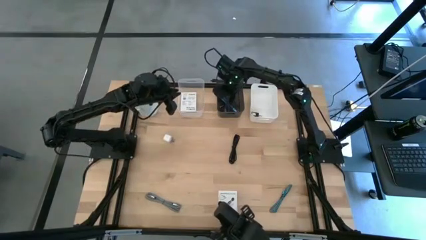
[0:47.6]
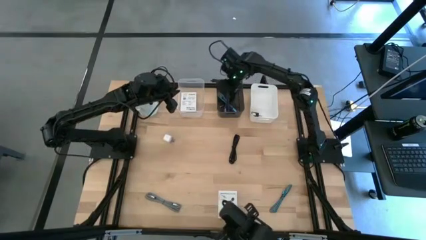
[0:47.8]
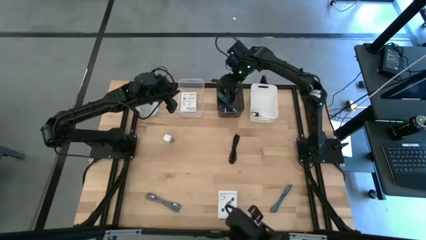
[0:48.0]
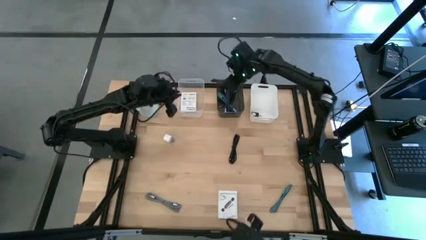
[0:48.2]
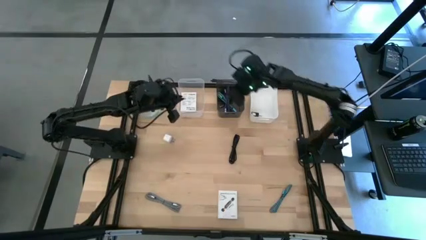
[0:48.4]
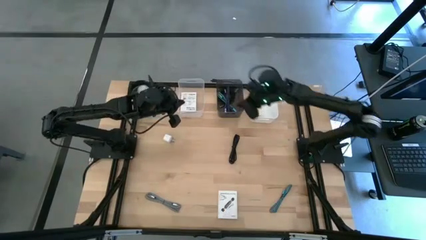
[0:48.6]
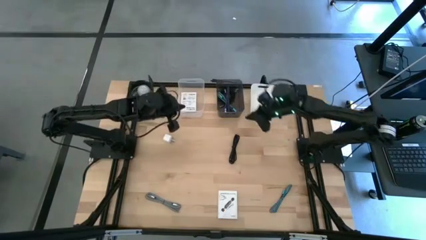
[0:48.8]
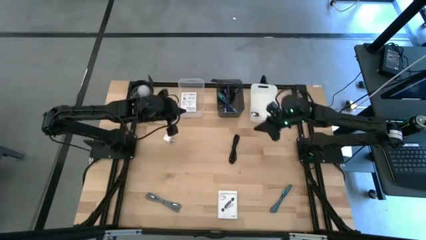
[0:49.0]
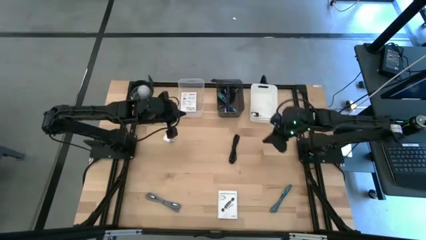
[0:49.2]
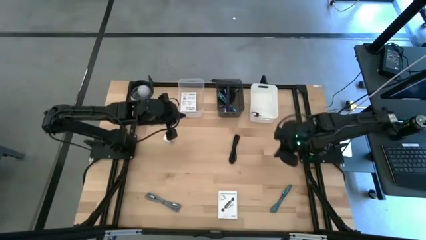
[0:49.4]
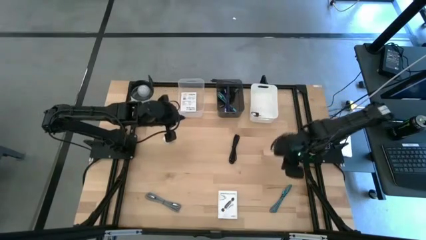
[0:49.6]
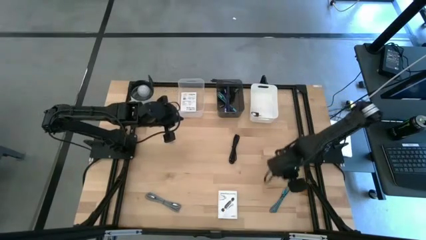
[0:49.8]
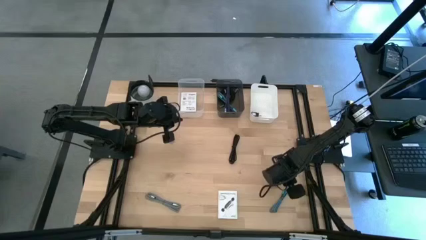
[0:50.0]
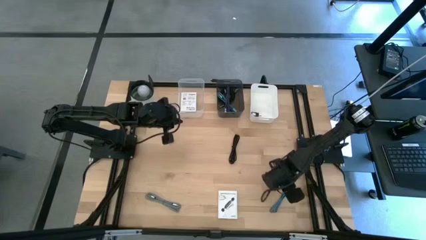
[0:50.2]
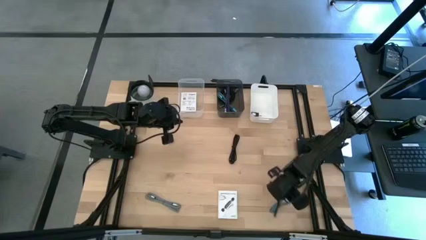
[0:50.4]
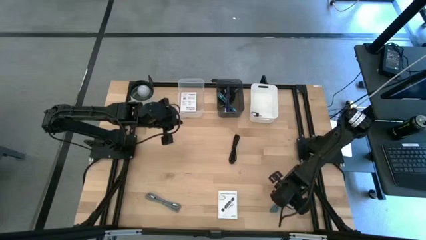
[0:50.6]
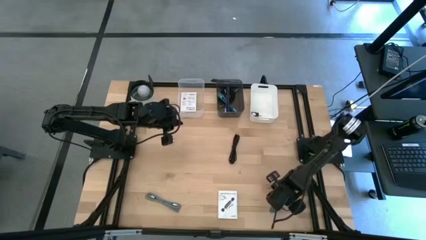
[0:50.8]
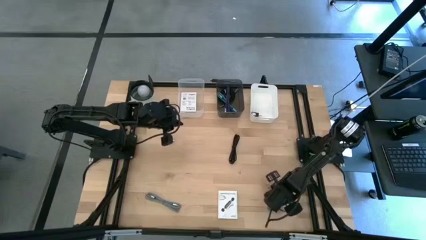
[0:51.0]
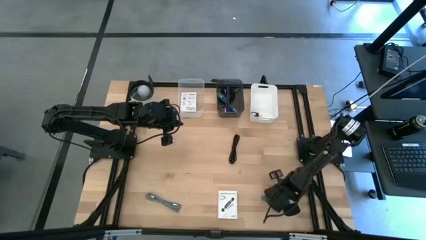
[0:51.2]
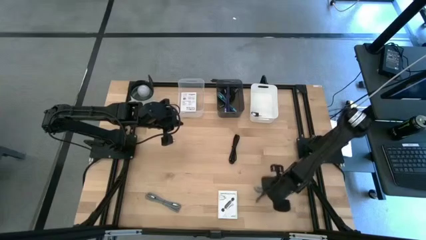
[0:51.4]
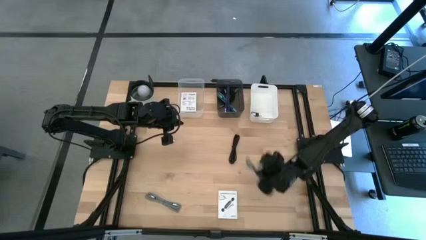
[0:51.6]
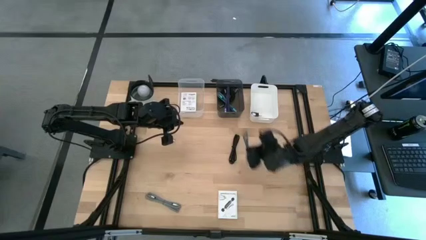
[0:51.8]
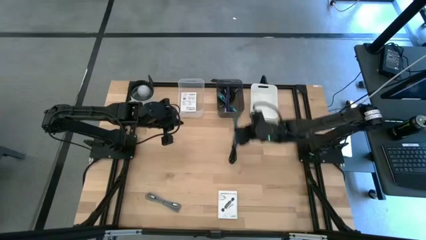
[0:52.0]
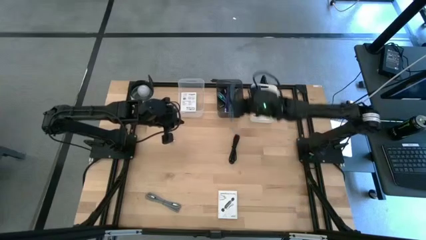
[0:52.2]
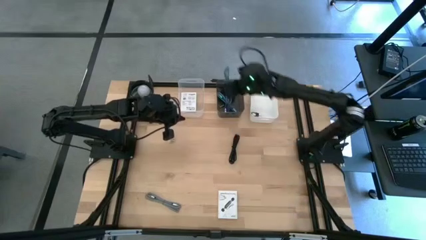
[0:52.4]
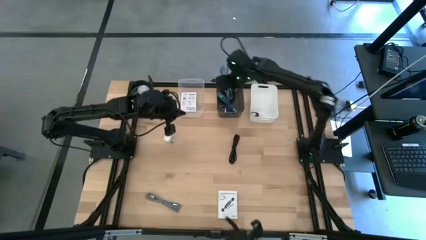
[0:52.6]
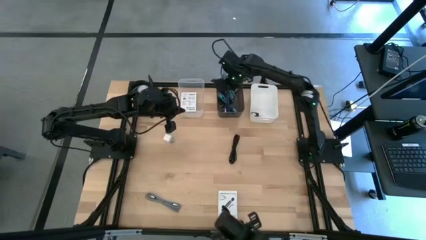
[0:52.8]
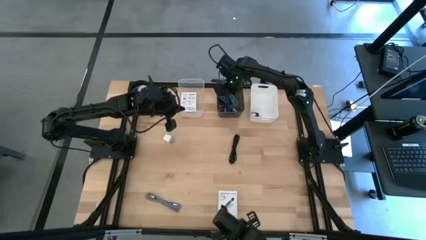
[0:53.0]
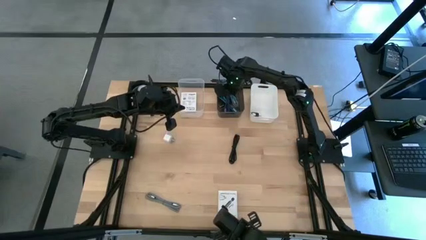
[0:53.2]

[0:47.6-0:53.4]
Task: Pick and place items into bin
Put the blue charger cable into the black bin

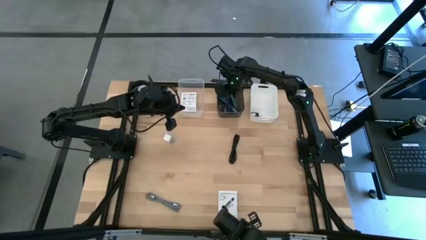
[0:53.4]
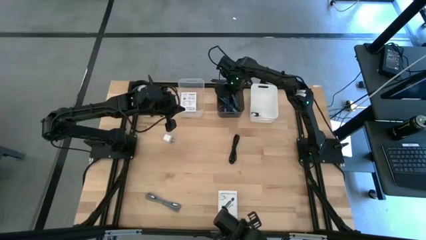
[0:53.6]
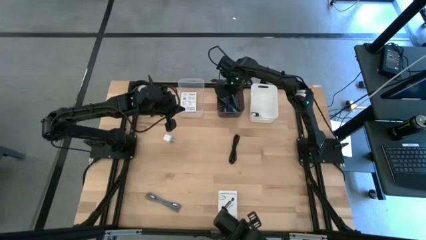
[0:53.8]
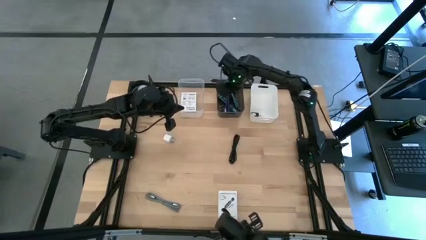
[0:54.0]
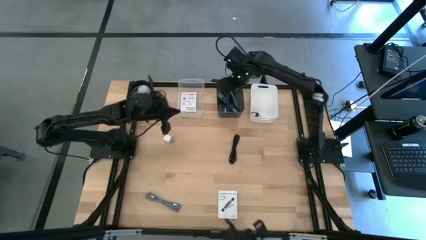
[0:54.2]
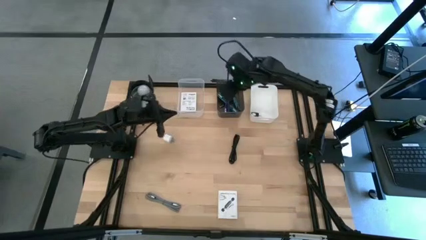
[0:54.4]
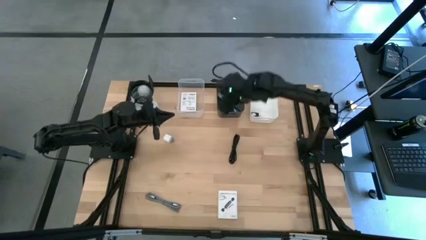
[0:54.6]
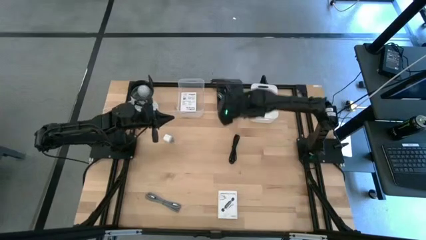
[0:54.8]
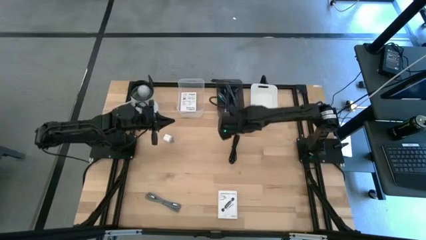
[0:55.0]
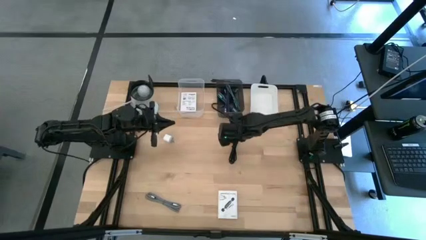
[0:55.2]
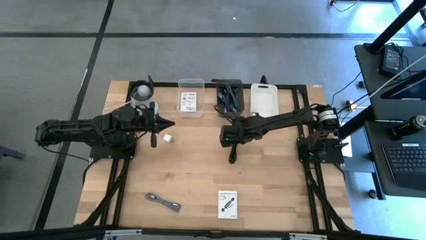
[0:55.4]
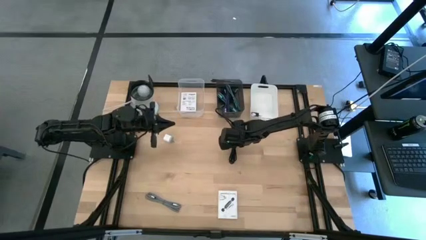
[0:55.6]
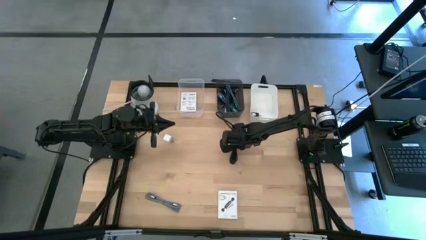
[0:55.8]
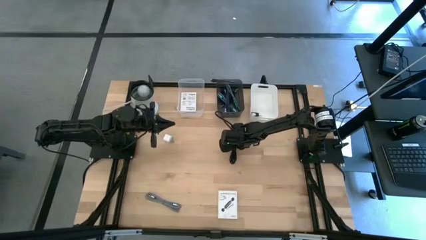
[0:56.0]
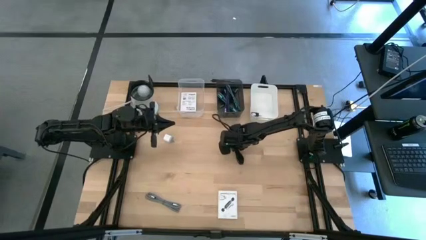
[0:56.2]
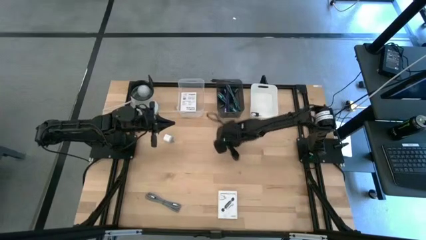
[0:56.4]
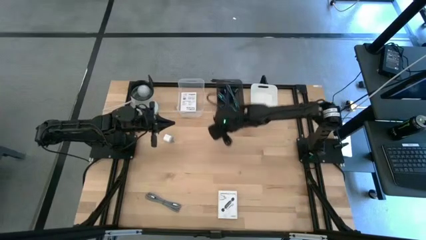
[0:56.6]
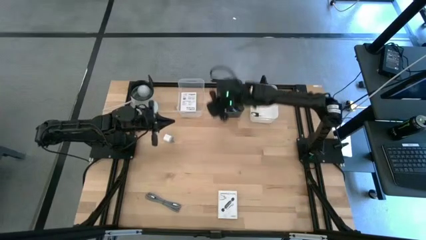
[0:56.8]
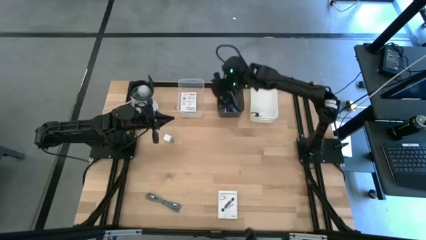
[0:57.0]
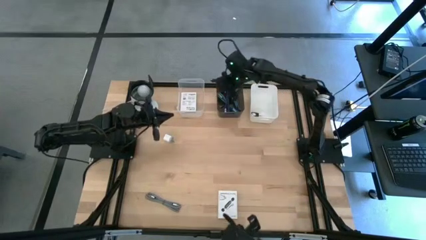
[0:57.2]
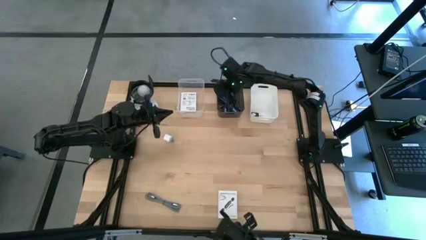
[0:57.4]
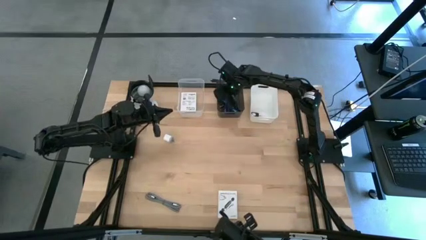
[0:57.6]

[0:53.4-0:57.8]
Put the black charger cable into the black bin

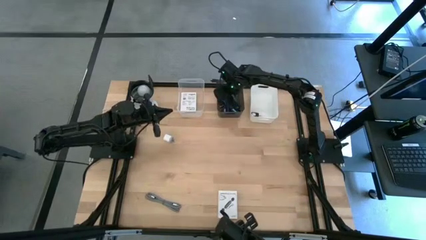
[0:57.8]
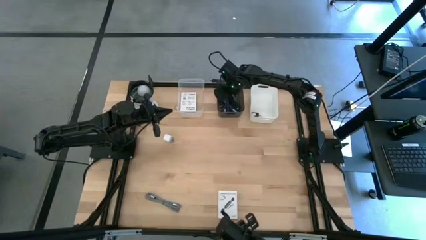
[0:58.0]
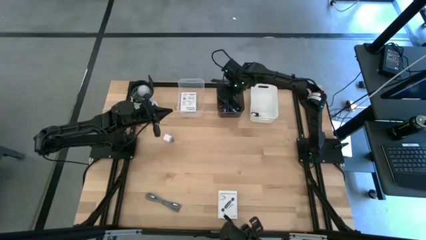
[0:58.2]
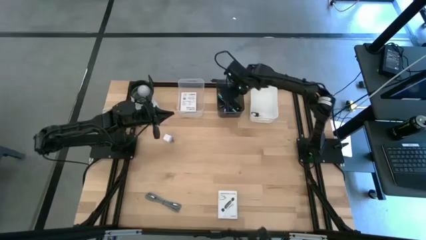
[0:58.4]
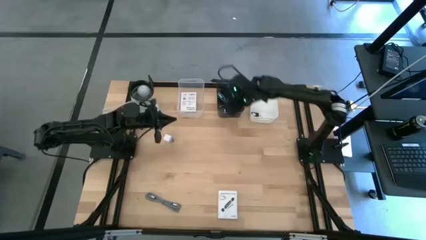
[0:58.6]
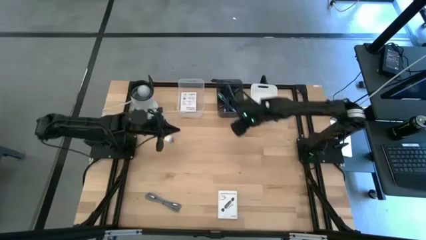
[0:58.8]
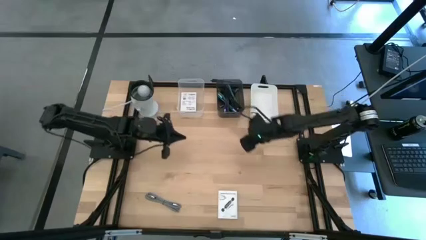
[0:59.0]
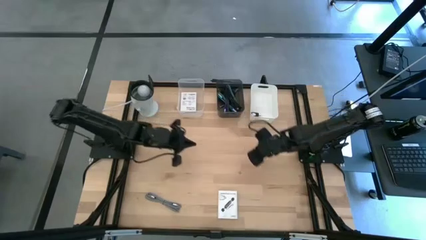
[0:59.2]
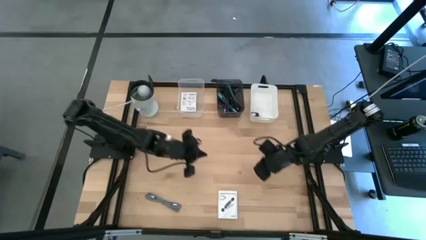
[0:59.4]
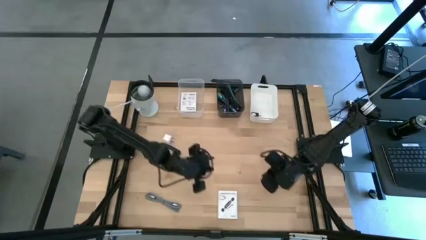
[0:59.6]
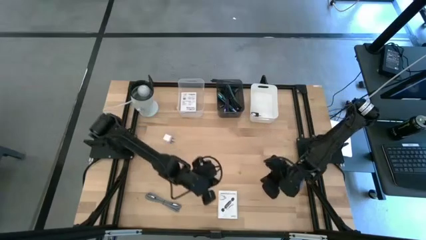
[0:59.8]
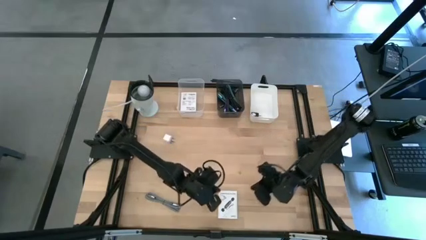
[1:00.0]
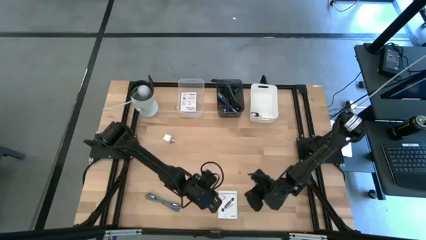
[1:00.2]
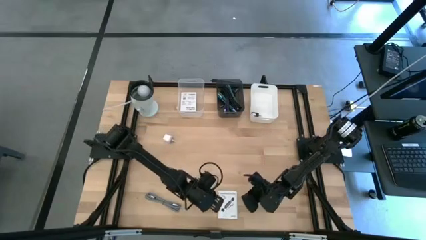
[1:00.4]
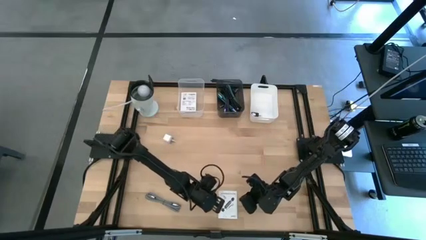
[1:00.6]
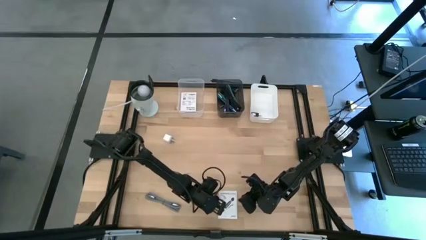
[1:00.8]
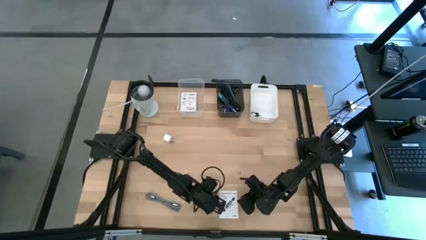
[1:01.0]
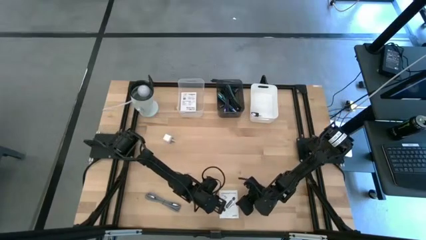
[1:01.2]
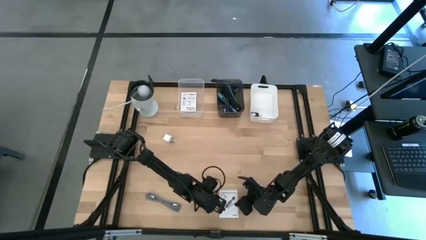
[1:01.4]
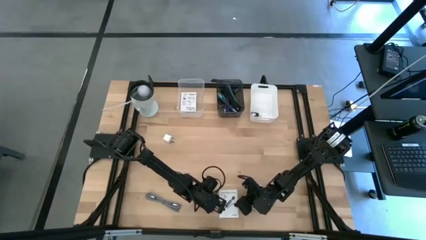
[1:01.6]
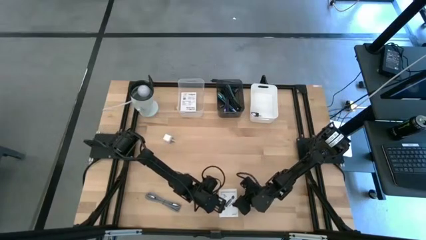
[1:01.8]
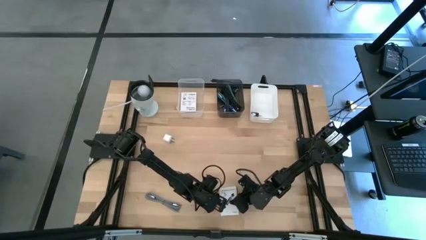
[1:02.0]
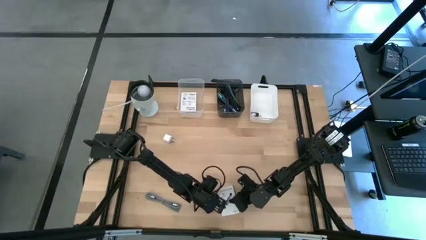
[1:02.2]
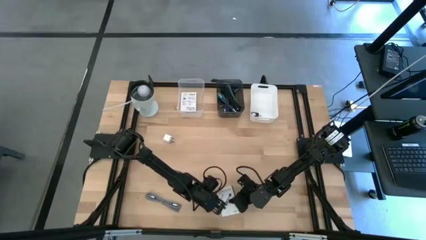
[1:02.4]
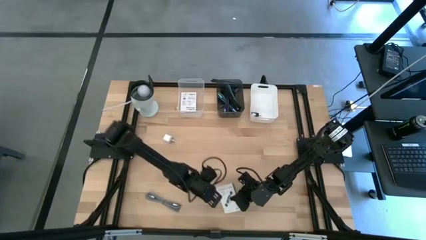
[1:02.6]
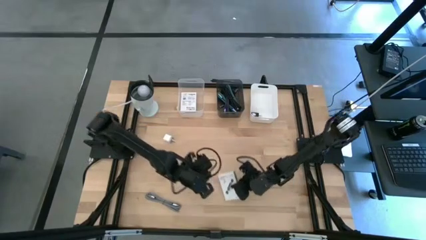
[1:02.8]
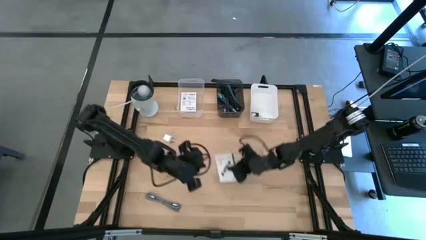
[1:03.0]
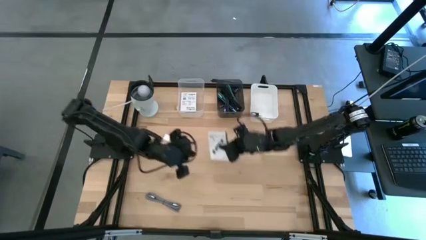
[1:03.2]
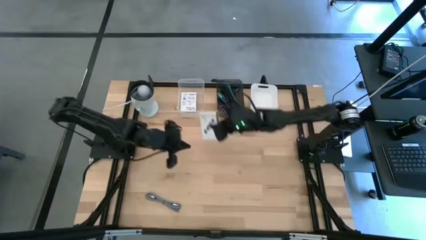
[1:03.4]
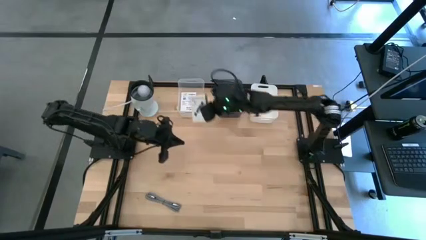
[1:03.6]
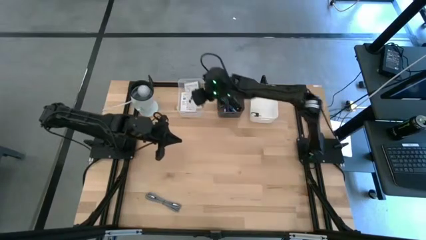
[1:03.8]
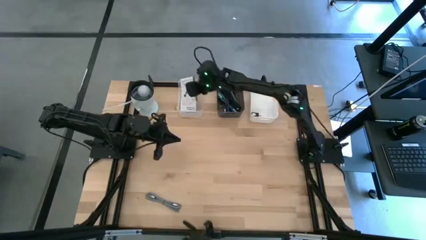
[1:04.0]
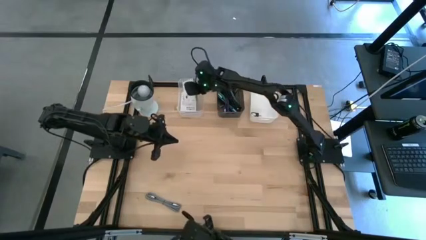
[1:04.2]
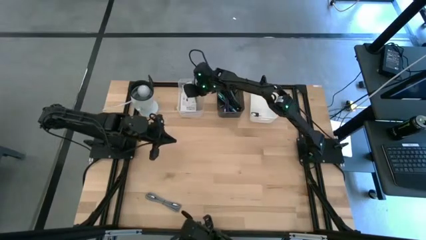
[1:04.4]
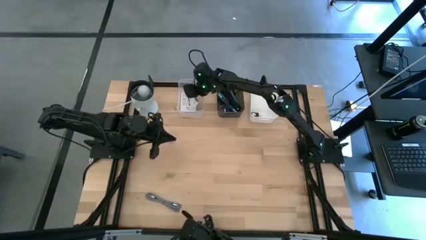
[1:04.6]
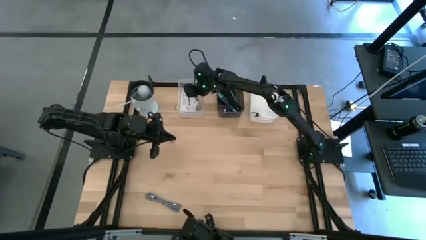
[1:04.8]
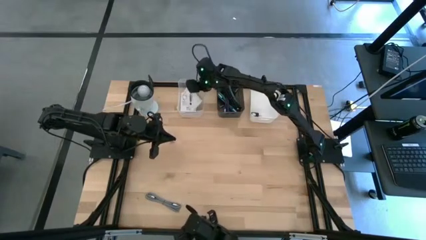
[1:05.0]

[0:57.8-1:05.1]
Put the white card reader box into the transparent bin
